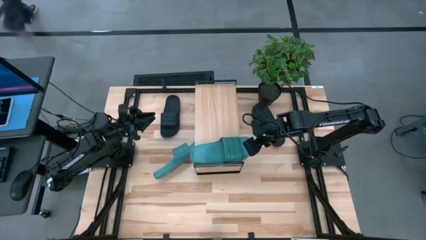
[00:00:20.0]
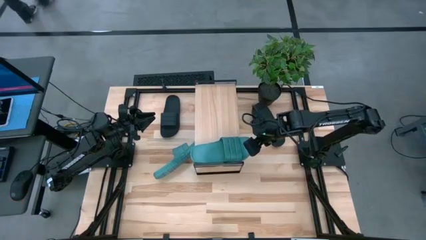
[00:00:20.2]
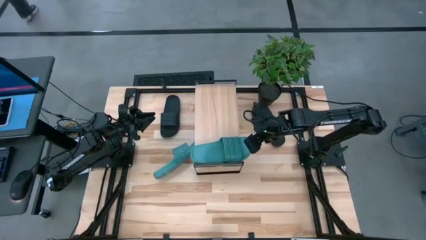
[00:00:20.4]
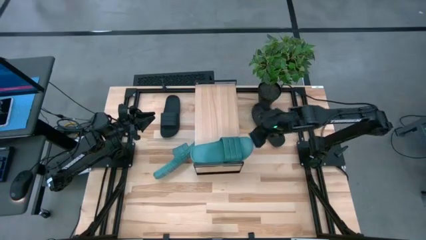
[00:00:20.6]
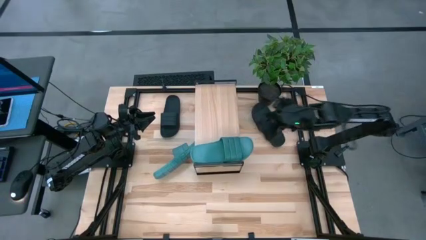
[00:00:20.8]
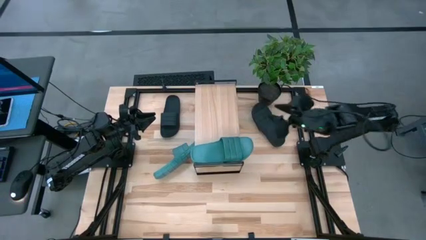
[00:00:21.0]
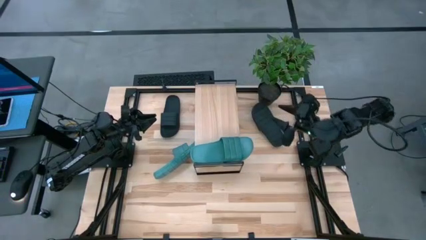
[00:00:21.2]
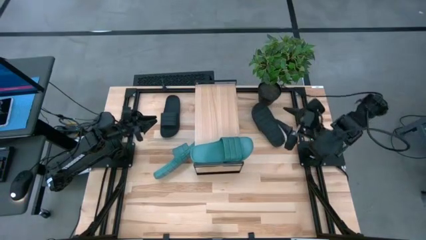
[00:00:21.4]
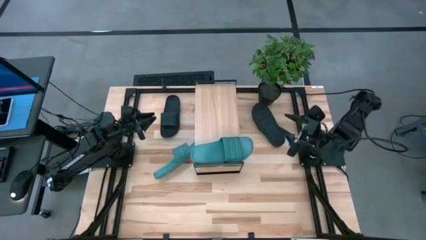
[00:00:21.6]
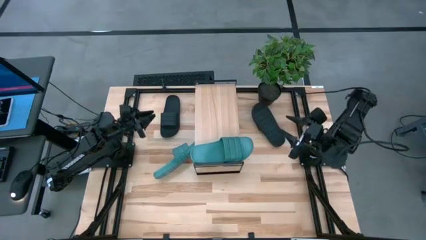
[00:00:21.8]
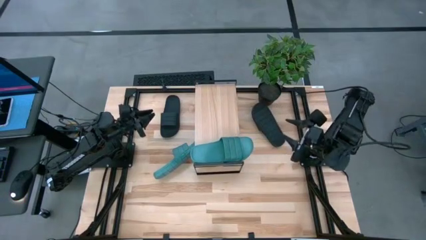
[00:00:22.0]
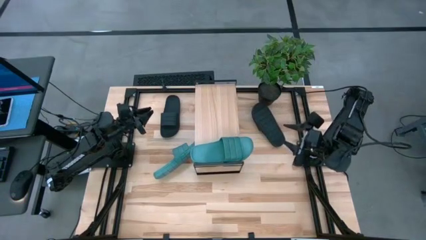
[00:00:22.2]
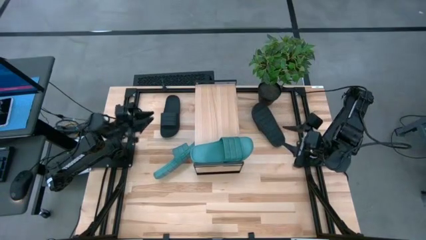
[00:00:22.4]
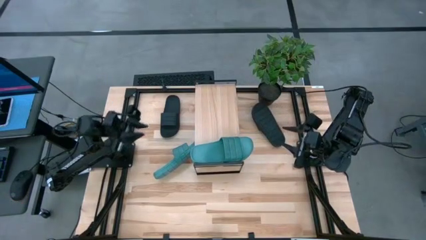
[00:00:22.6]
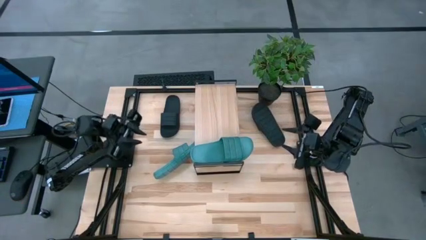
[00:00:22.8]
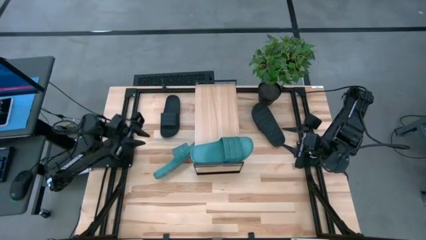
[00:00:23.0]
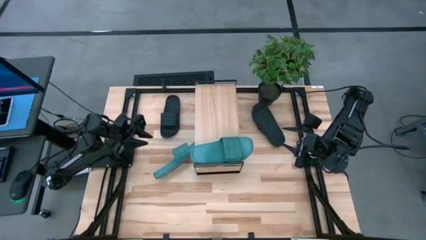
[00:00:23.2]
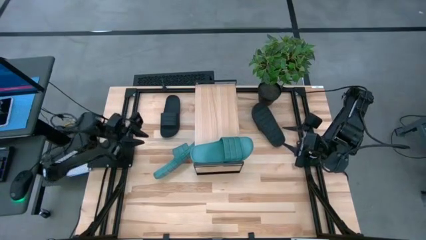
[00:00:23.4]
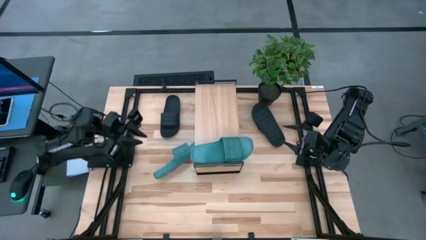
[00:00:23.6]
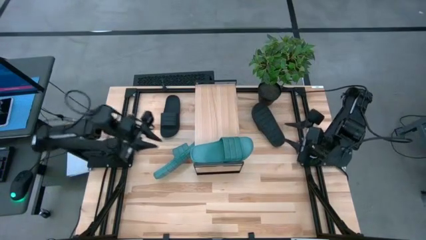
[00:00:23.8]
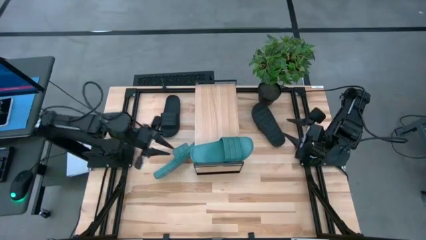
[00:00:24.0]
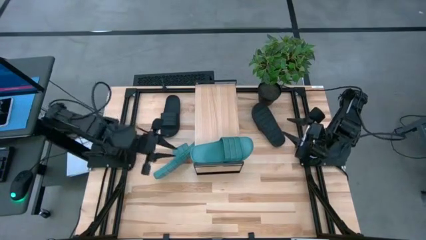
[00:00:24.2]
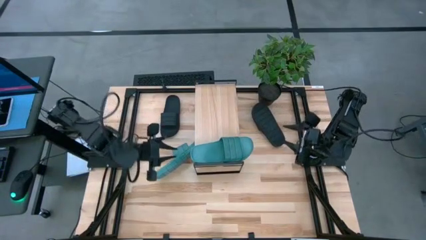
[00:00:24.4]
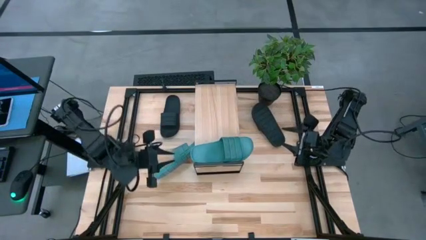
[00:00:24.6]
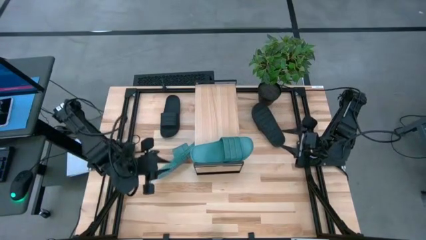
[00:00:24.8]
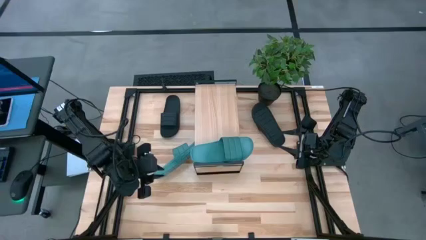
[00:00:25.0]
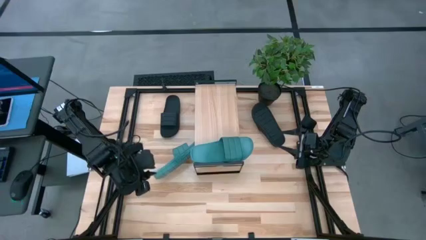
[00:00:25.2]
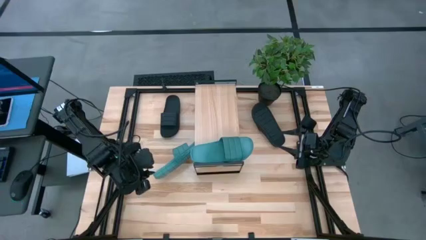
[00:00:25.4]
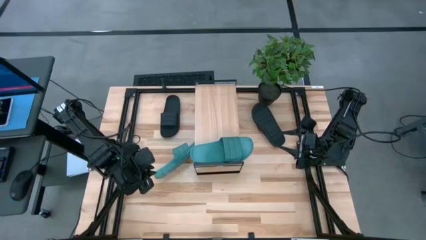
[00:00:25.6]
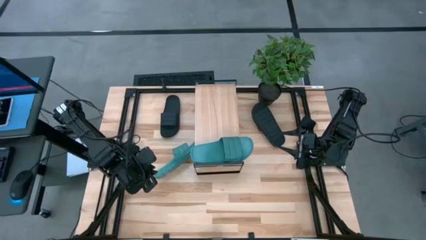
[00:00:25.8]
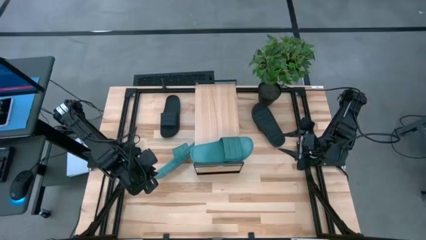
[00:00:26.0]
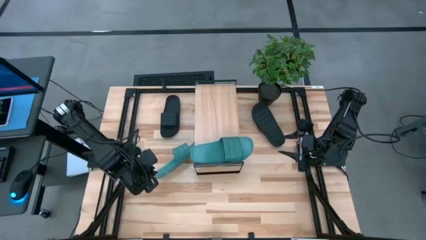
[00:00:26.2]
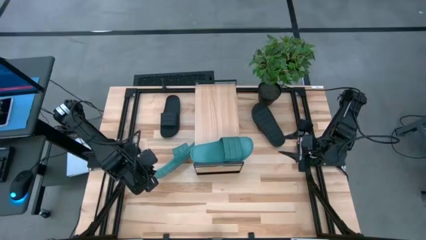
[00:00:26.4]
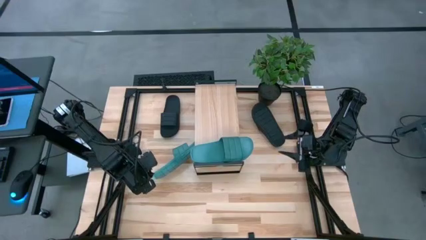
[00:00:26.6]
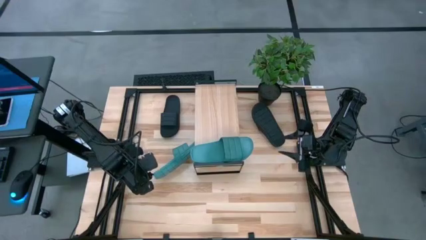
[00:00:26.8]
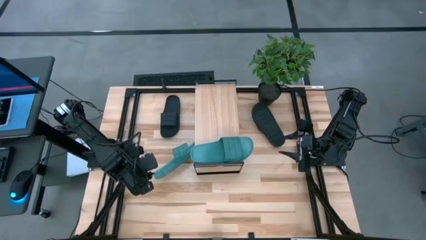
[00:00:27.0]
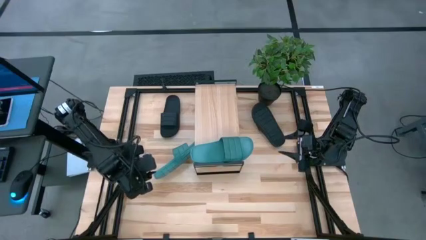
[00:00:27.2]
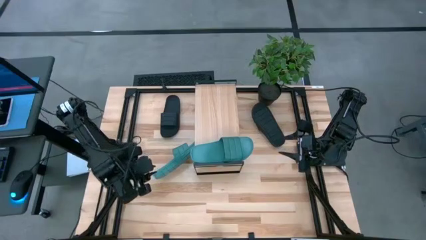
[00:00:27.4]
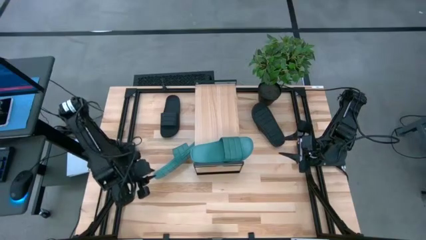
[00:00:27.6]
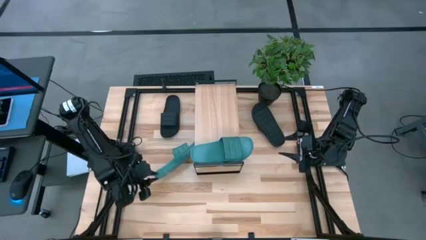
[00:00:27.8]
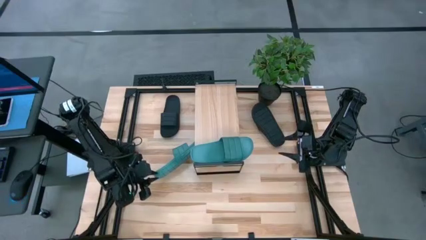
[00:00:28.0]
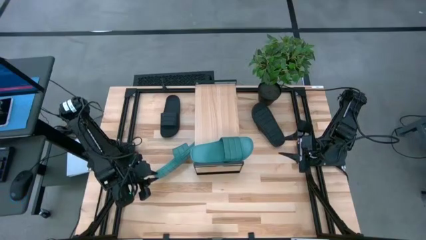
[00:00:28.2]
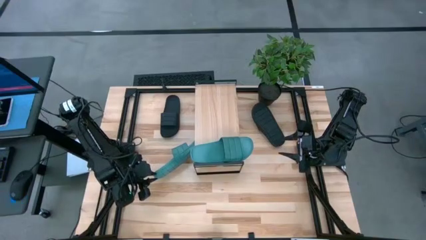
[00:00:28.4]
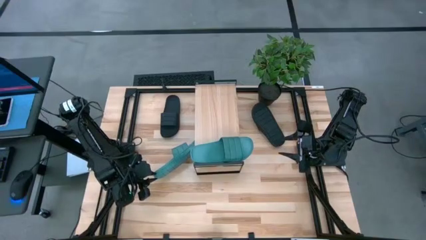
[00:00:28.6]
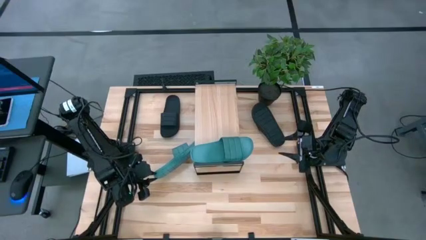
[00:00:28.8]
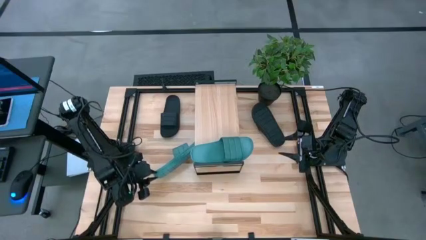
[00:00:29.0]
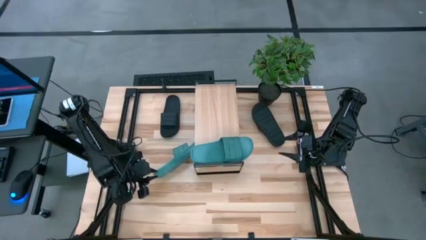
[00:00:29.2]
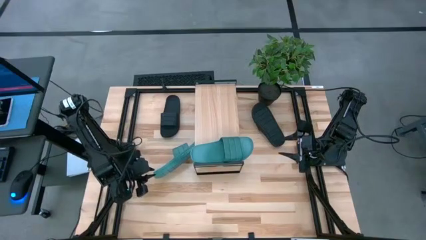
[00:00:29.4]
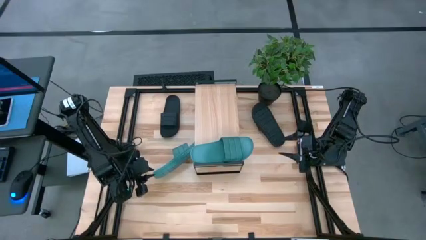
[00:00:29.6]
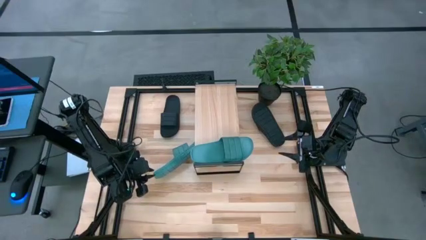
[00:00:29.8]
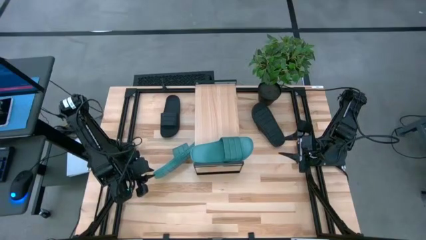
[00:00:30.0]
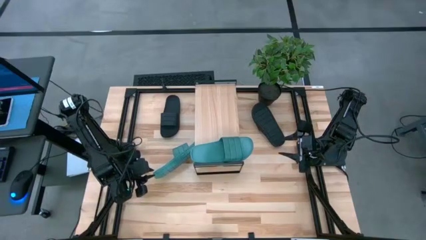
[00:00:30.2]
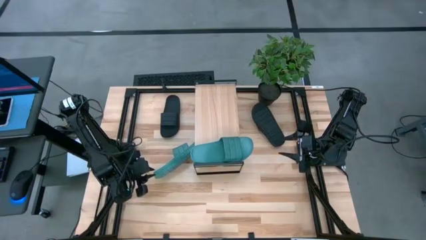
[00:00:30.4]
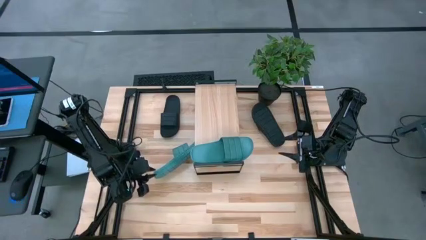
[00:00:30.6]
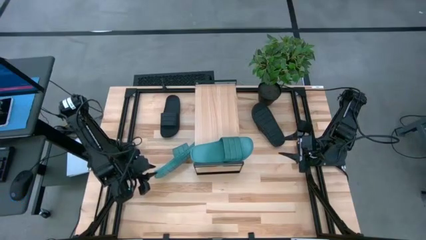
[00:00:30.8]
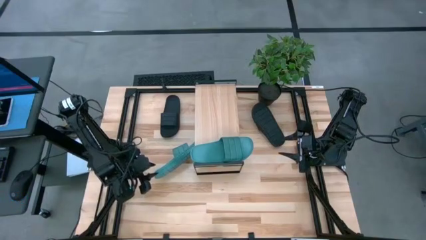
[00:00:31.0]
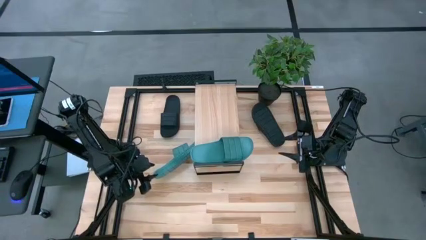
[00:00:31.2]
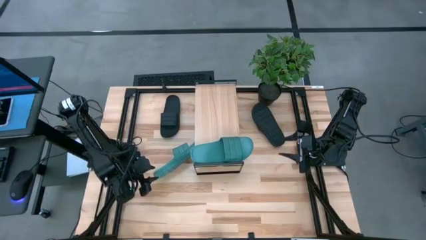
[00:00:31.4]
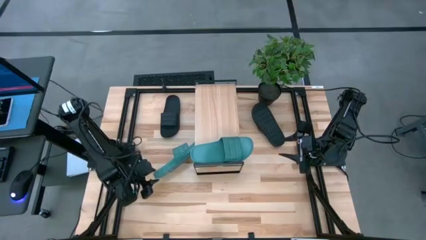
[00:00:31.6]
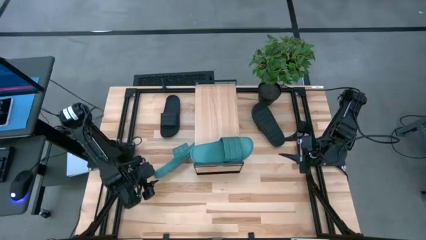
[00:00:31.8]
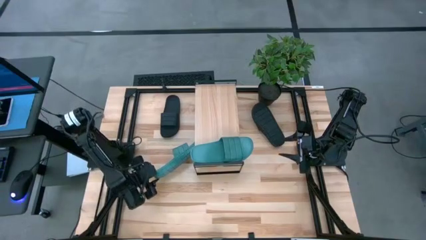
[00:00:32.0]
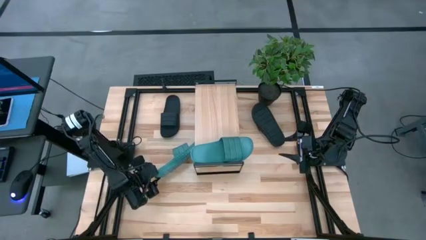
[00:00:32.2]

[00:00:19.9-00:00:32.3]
Task: Pick and place slides into the shelf
Put the green slipper on the shelf
